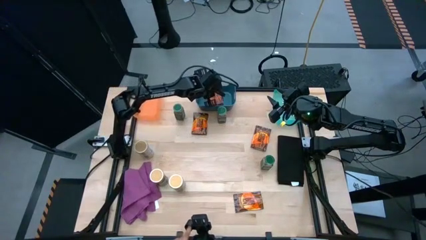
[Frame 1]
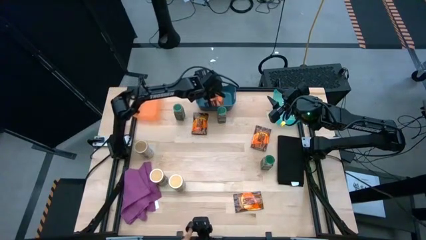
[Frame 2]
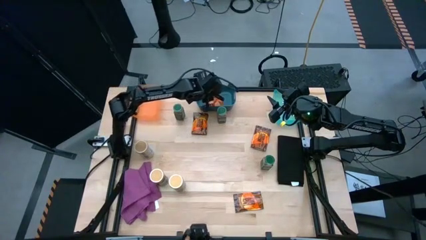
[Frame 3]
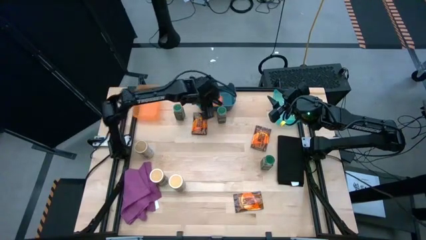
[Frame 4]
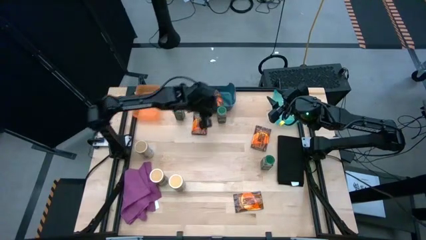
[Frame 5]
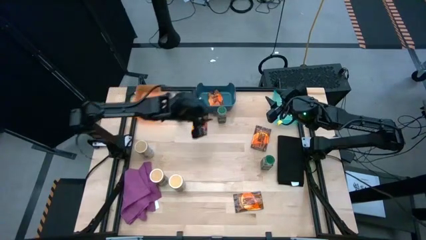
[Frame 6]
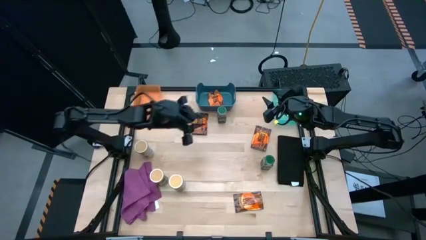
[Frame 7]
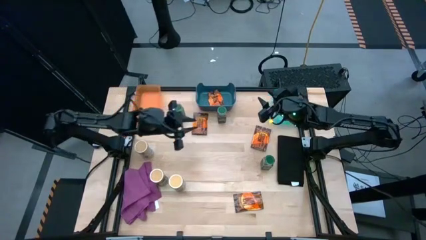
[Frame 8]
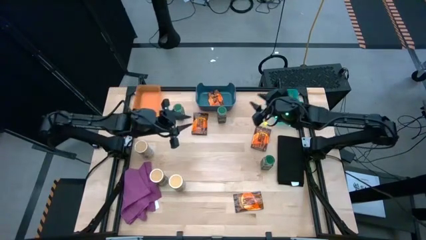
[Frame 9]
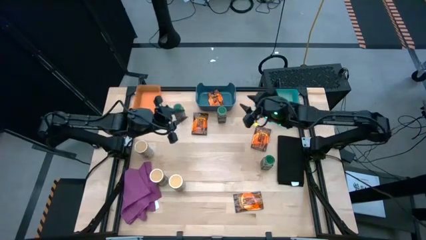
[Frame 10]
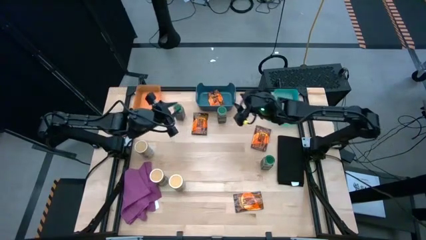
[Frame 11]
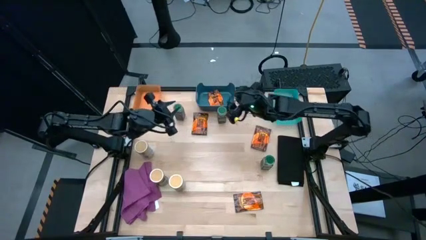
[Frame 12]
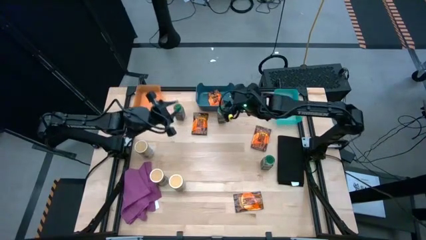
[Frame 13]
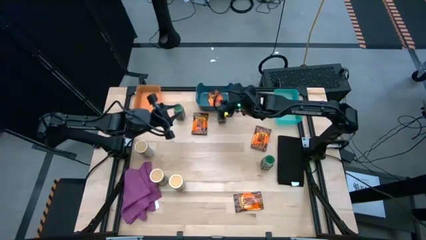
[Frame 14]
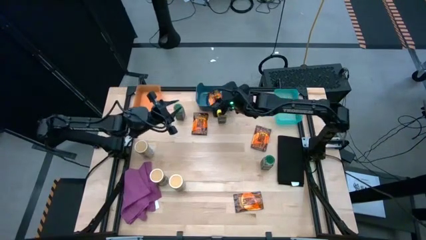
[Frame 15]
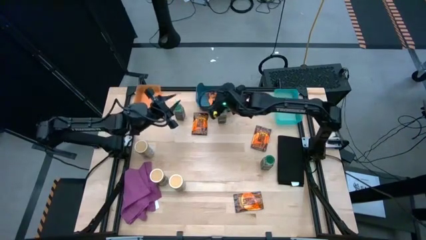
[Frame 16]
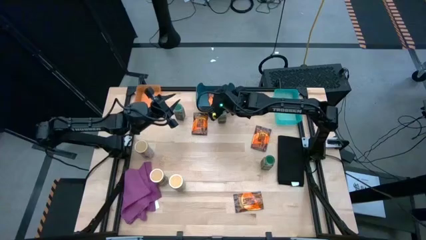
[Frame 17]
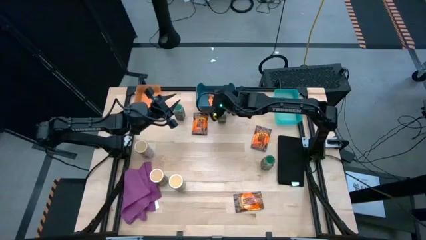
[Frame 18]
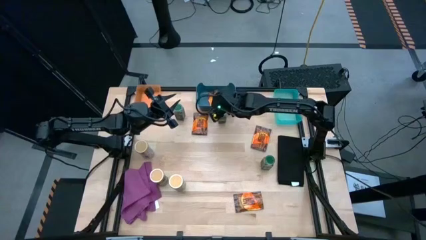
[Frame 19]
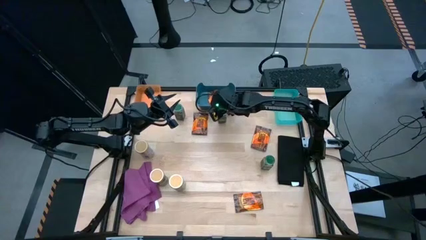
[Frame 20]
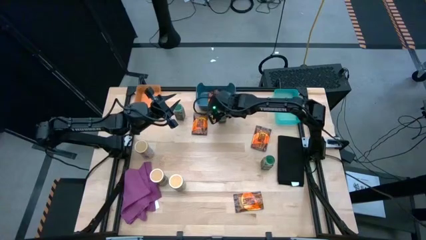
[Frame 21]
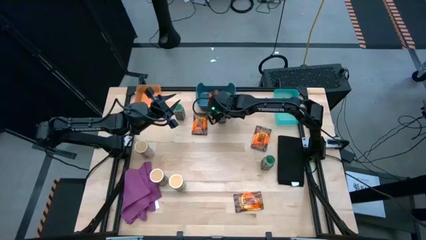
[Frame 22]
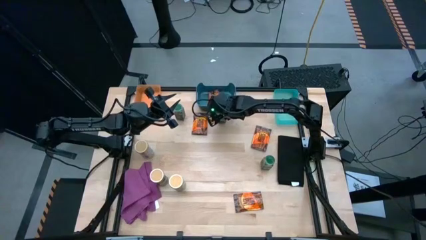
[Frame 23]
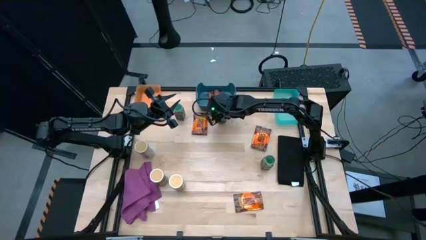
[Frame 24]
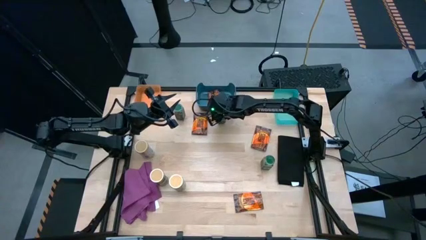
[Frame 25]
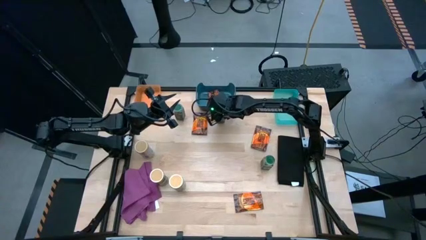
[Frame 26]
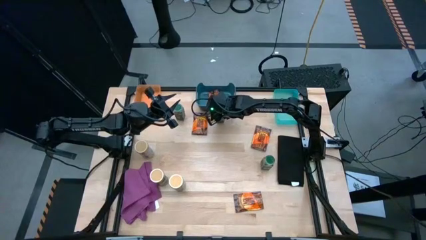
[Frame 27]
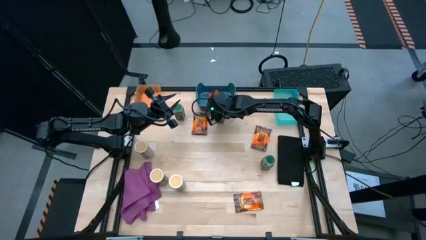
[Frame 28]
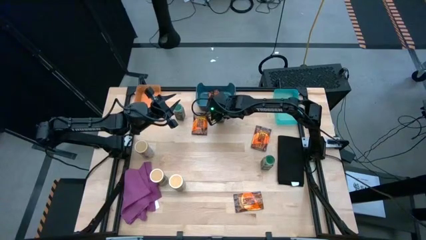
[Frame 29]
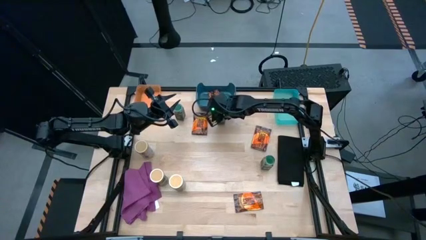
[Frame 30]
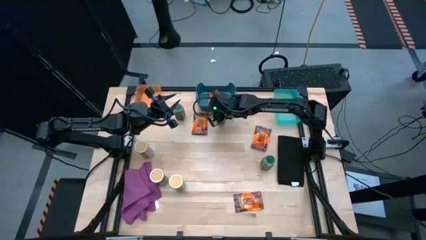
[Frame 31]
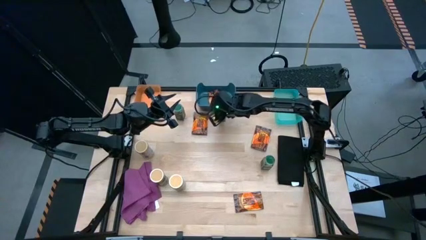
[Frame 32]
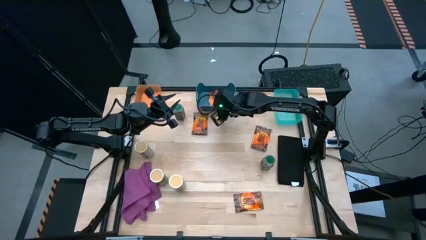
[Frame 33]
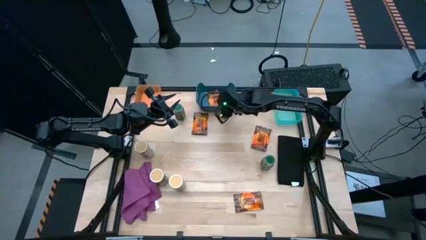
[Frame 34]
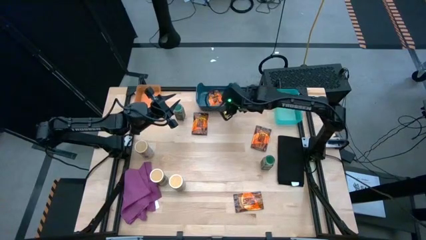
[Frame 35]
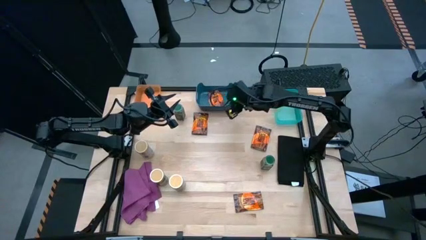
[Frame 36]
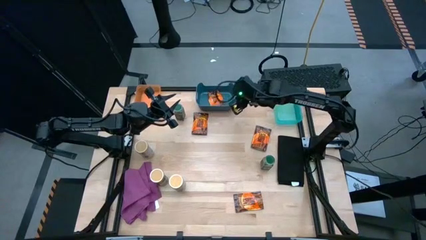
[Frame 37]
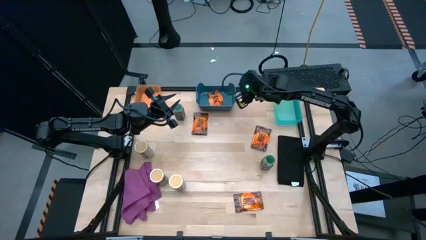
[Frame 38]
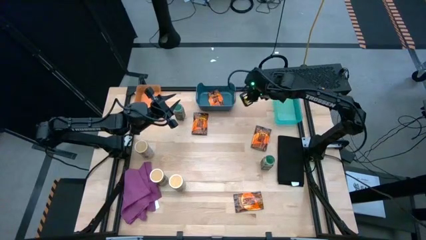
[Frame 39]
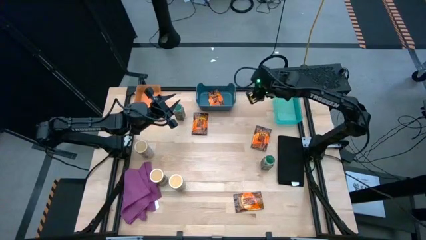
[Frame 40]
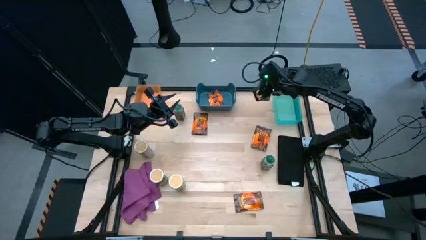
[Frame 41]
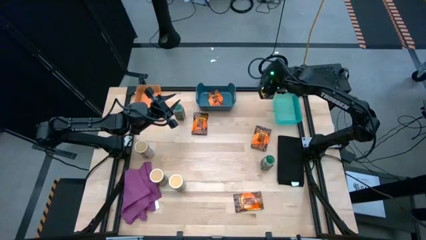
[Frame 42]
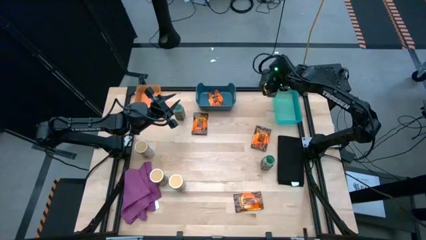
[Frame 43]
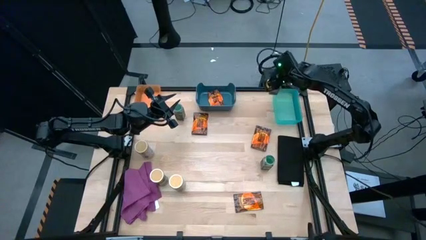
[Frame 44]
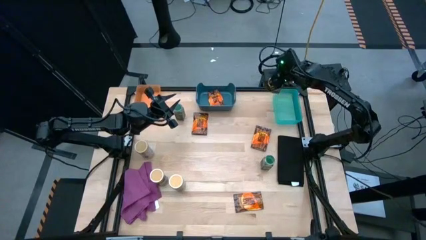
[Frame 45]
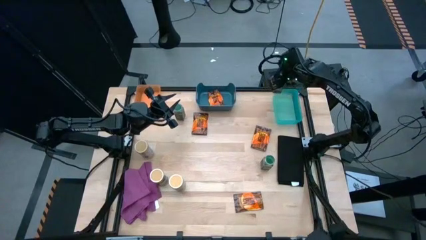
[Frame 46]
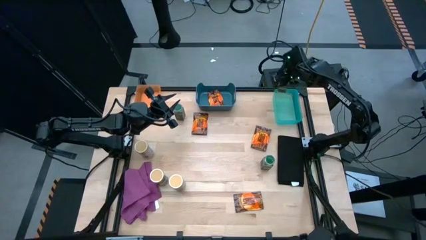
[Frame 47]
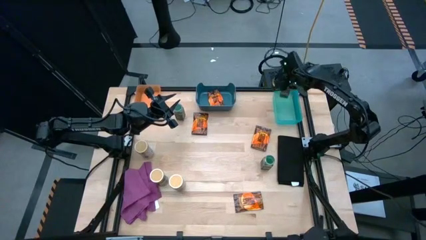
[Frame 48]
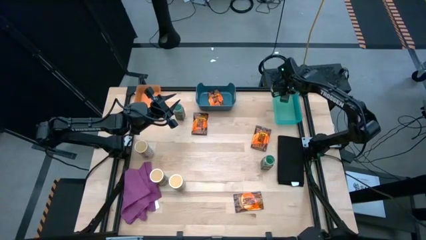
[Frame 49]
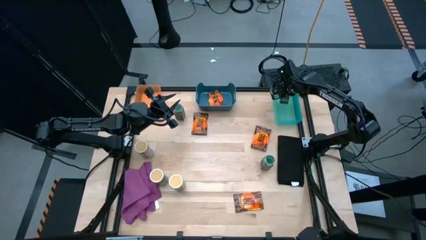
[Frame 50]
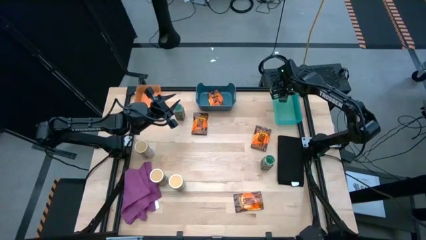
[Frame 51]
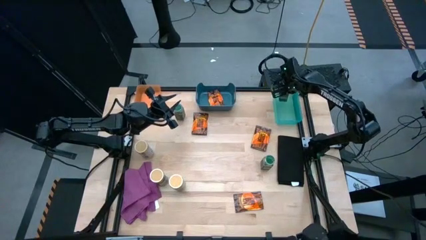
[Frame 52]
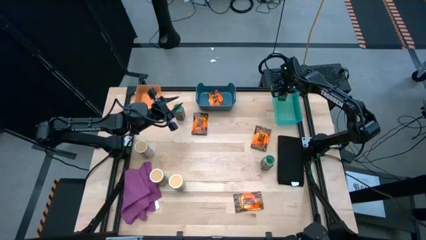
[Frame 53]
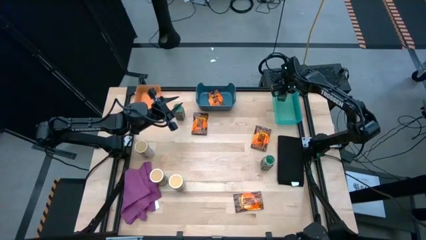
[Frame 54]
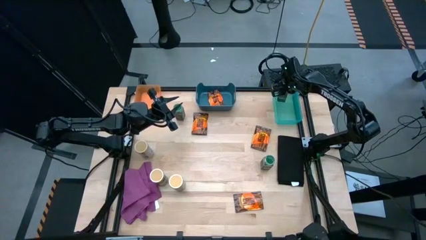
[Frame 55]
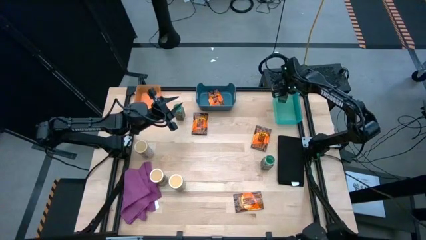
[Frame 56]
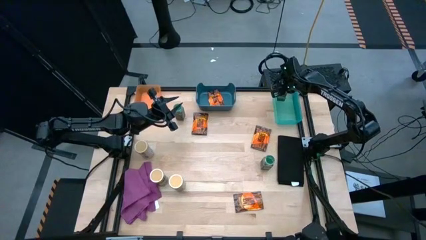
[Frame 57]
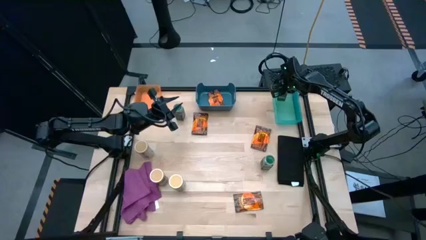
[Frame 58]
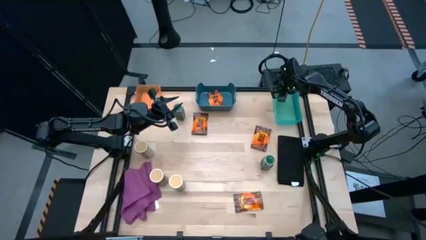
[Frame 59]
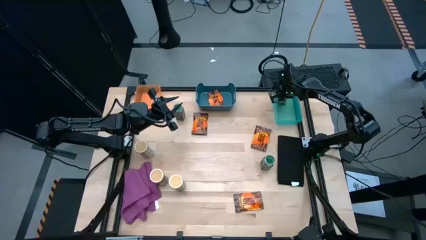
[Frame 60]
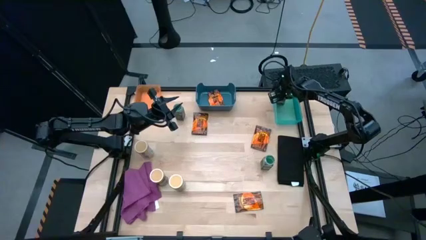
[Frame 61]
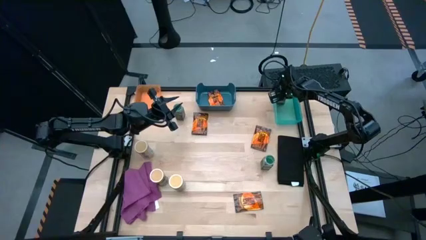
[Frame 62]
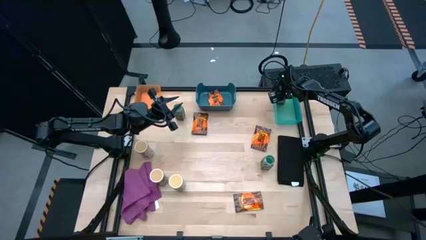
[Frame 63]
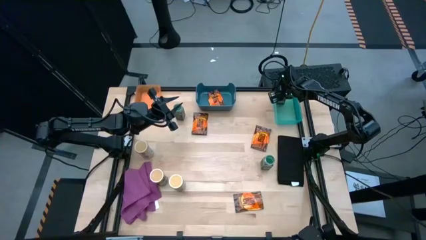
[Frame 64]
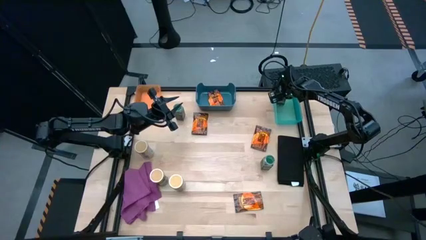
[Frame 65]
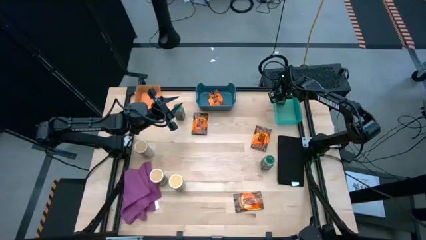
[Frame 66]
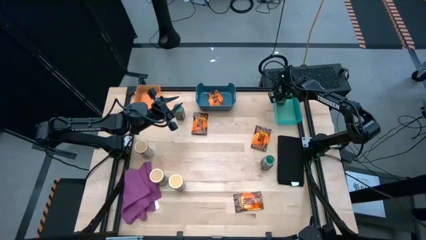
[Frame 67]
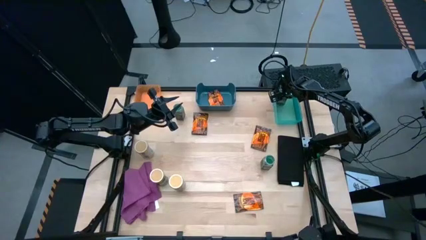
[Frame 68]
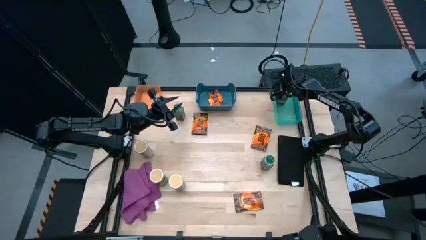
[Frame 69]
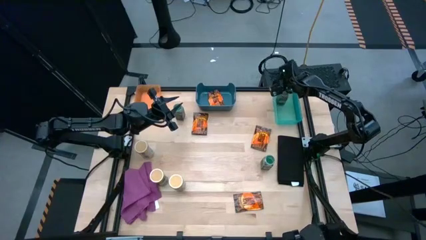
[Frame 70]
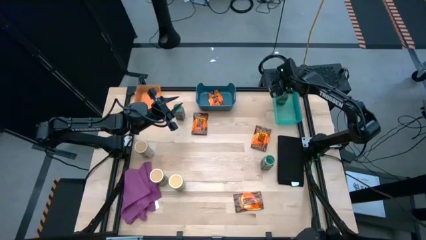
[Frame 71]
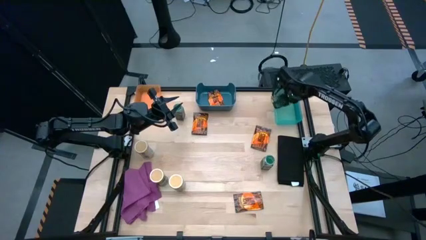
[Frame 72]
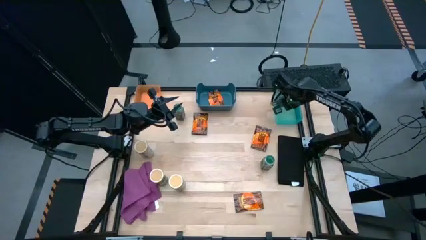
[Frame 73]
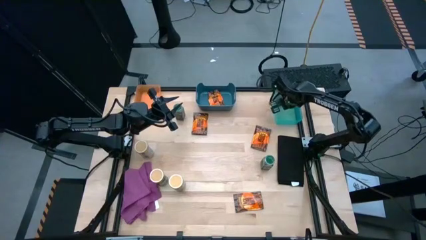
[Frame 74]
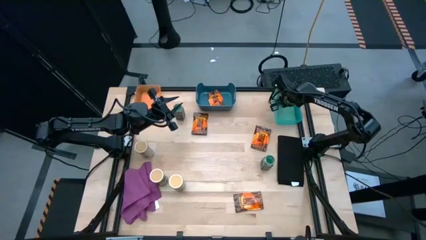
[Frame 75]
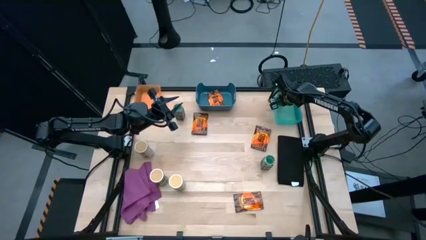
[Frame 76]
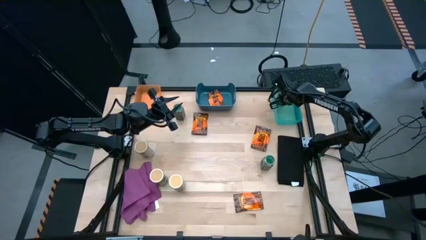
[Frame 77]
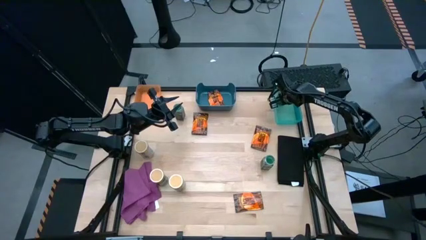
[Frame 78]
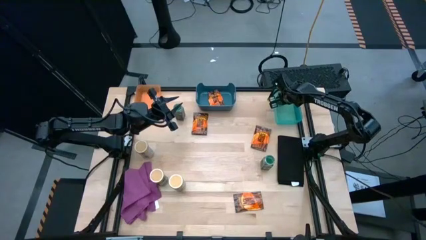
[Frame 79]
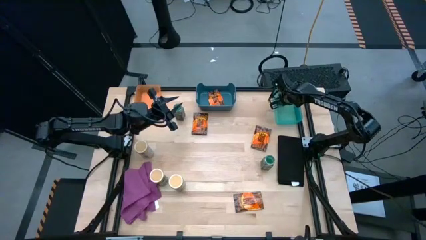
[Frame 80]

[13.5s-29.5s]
Task: Sort spices by type
Put the top right green seasoning bottle into the light blue bin
